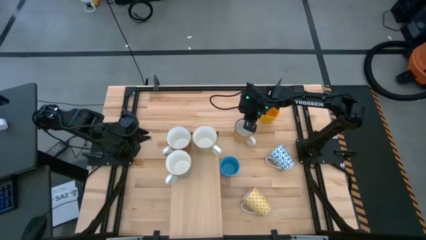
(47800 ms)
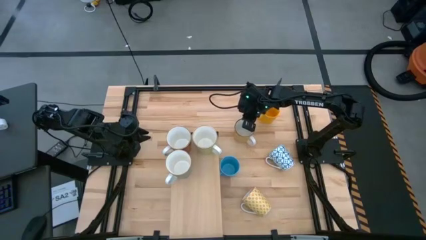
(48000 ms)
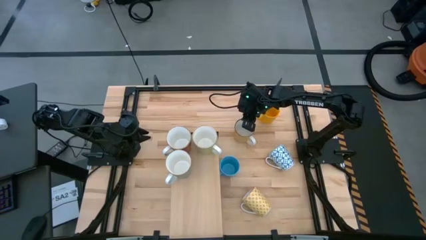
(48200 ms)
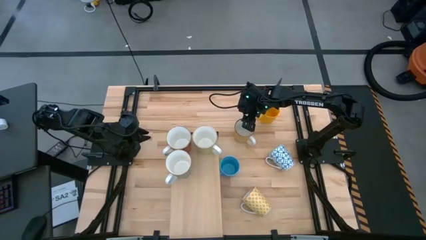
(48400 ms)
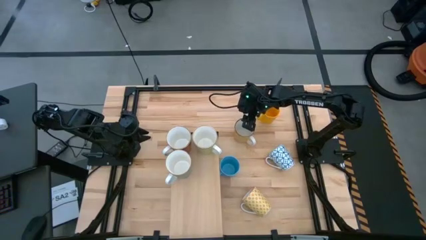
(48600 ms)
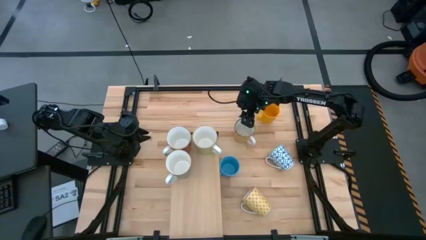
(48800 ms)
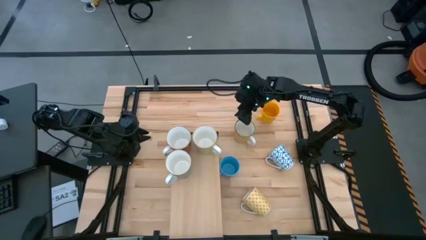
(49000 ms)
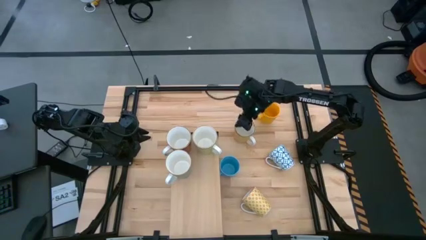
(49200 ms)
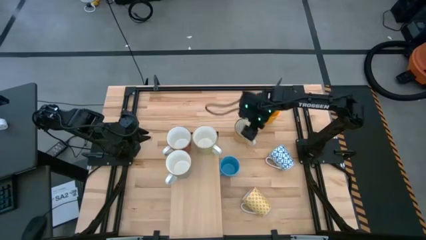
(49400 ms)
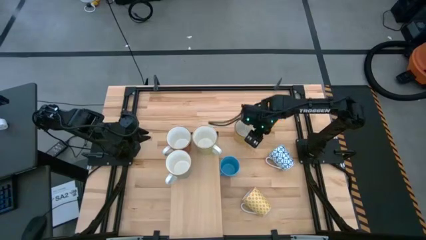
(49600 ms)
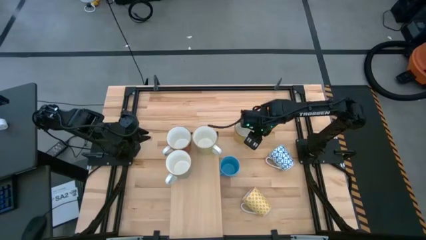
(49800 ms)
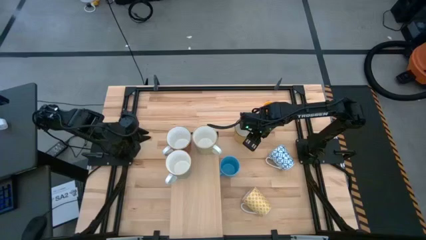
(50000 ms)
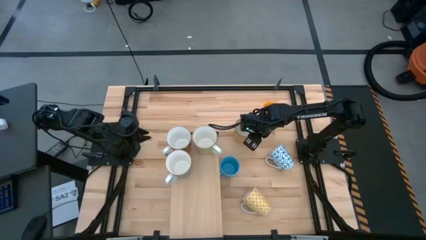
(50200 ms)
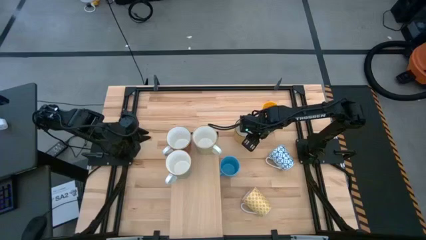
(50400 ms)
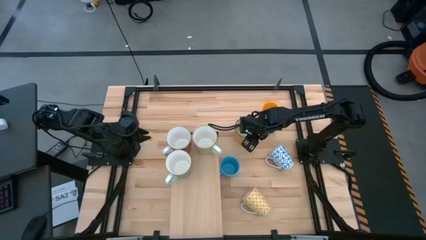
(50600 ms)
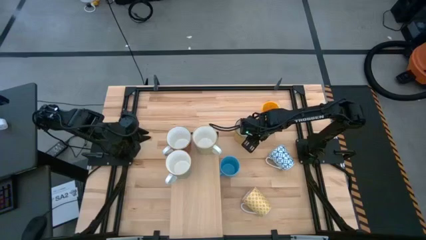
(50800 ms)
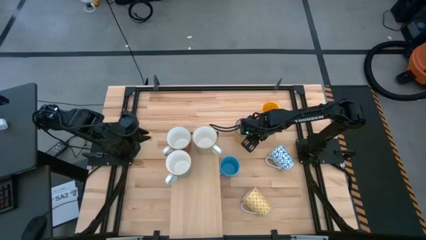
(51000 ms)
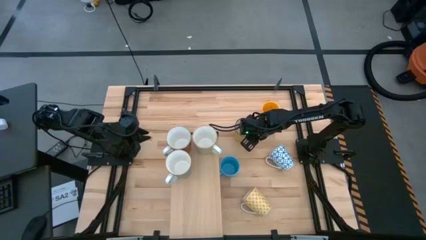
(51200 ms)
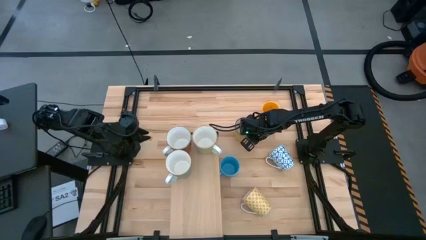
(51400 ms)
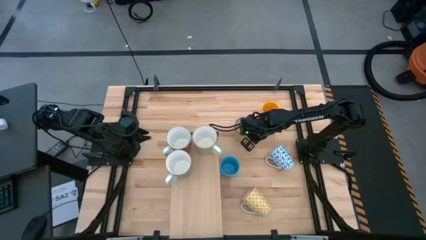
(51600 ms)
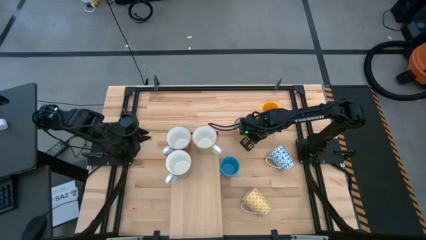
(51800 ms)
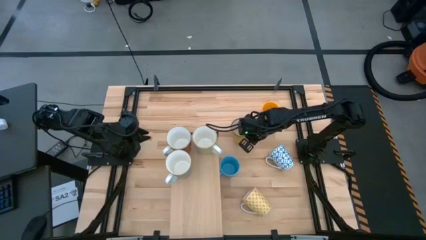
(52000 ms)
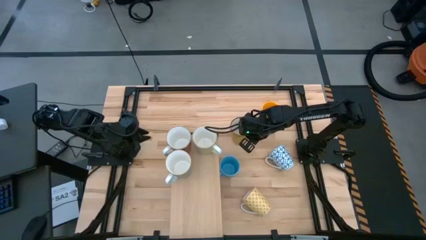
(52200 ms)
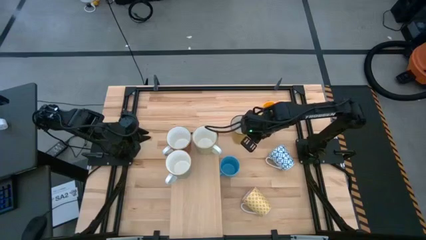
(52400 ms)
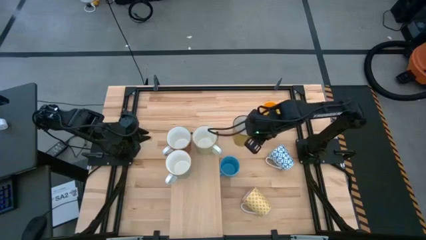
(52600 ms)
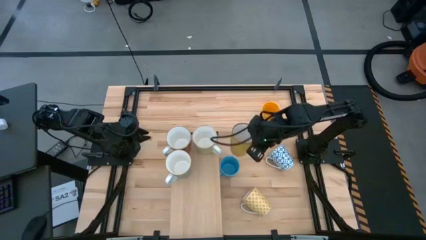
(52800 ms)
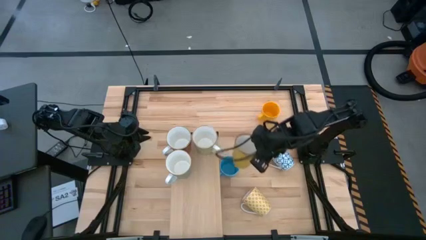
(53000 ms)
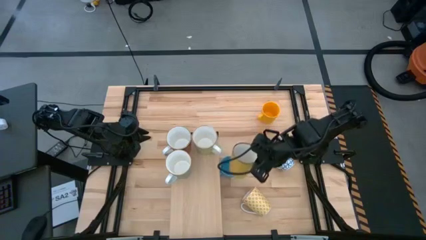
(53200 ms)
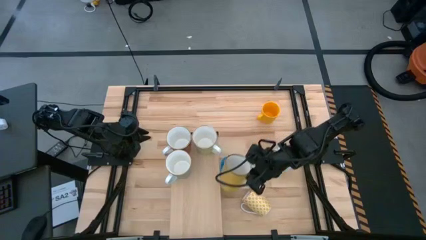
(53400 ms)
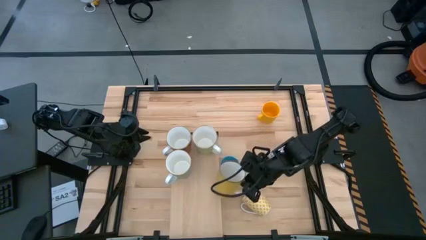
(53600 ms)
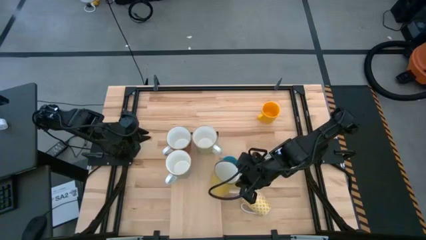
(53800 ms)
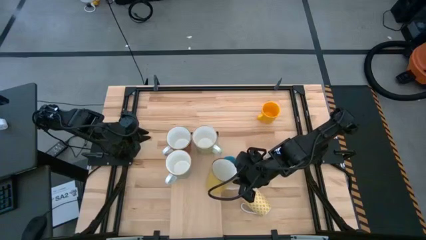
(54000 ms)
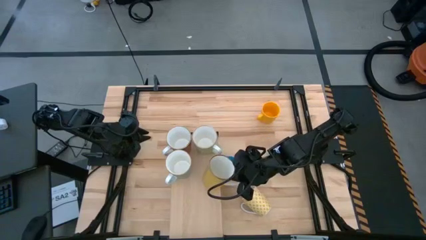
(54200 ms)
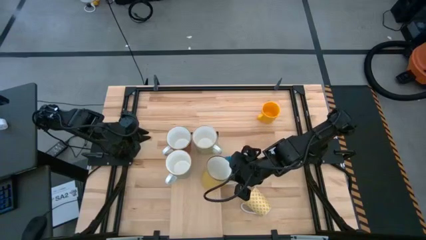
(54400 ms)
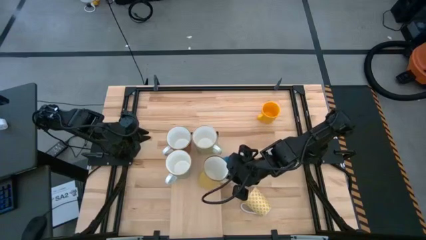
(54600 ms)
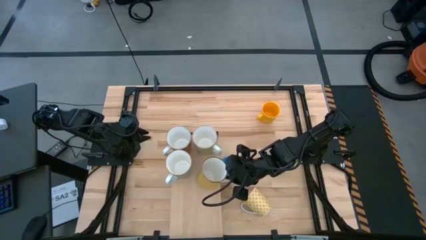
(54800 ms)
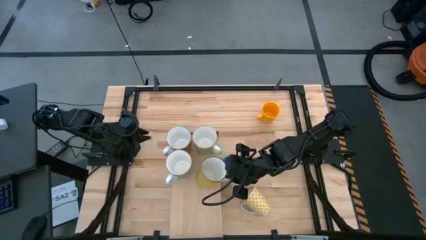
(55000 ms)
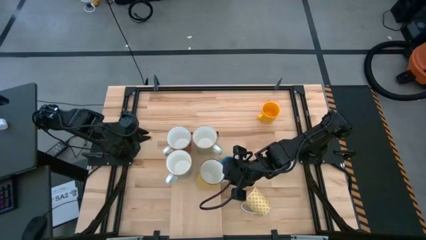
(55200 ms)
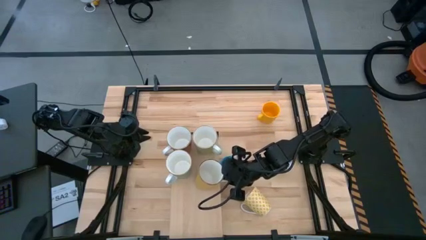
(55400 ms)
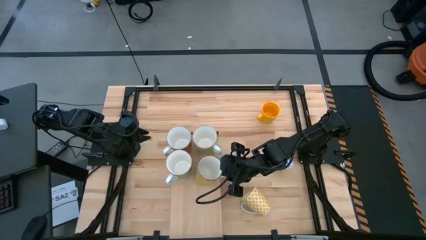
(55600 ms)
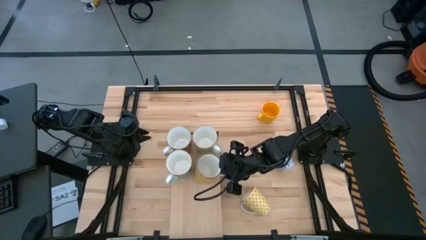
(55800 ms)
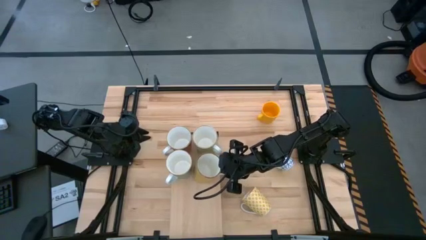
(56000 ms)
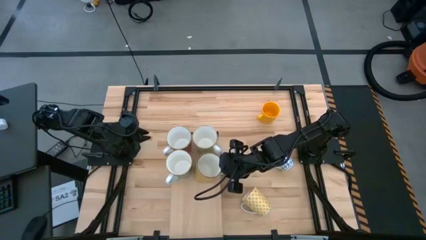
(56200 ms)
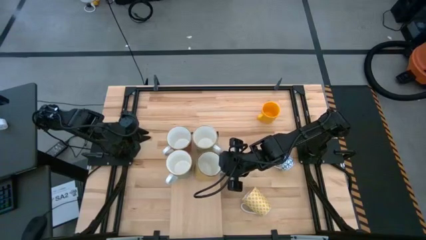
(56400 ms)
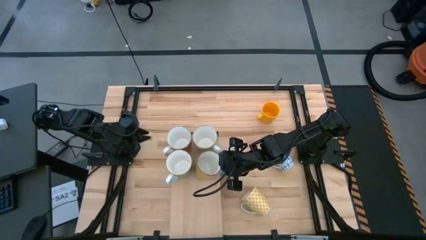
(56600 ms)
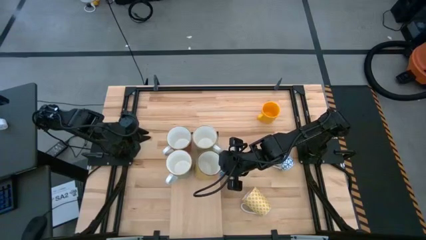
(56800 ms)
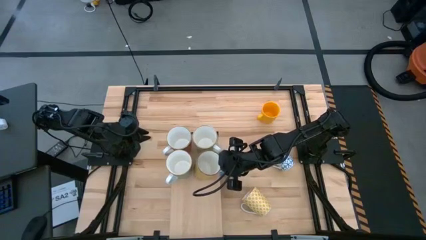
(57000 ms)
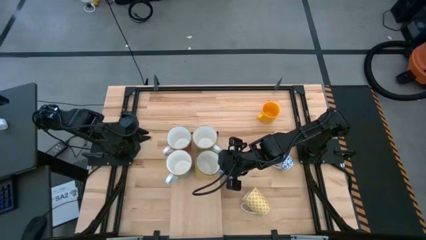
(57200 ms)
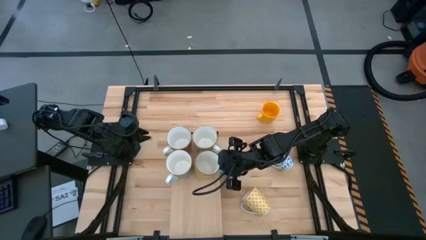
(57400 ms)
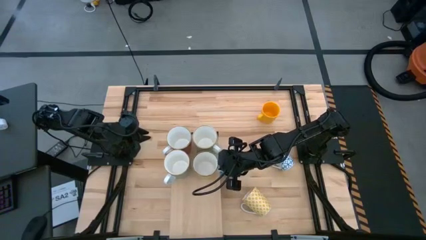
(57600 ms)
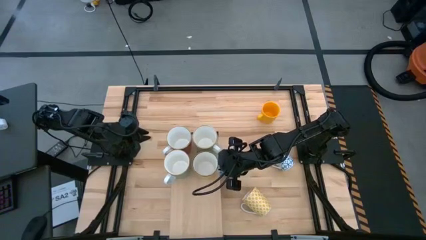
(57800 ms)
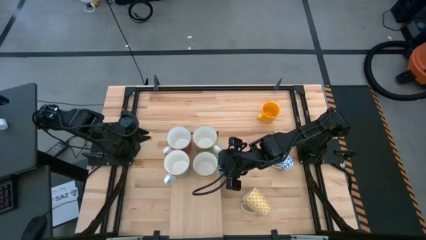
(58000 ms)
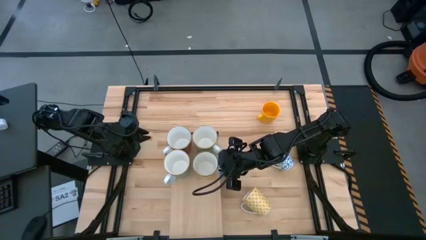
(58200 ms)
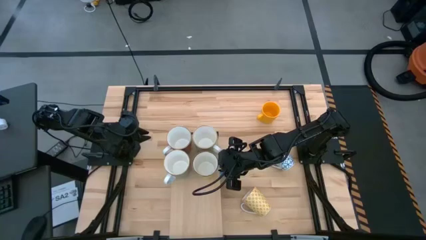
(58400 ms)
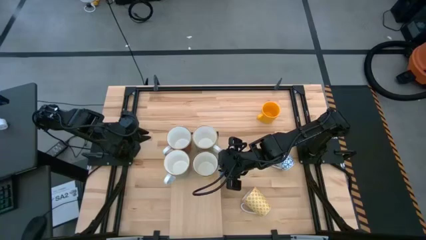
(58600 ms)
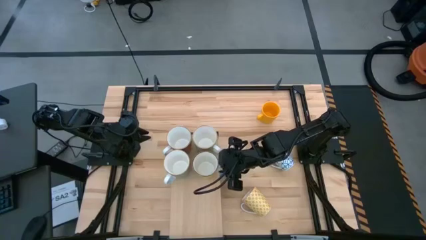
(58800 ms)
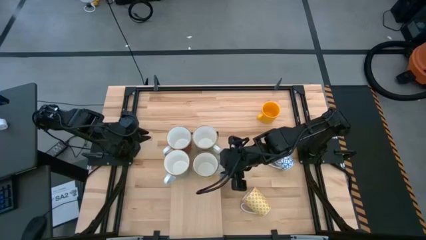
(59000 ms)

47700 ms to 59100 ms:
Task: Place coffee mugs
Put the left yellow mug on the shelf aligned with the green mug

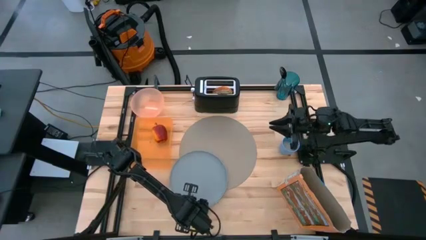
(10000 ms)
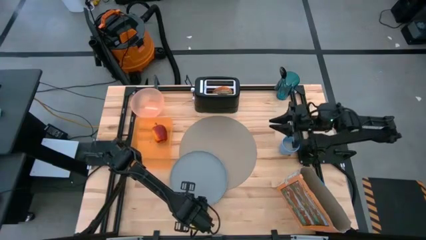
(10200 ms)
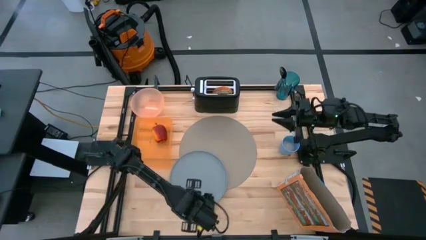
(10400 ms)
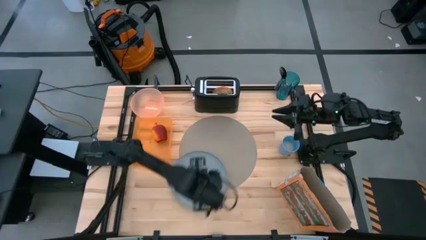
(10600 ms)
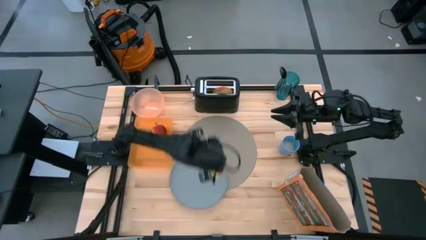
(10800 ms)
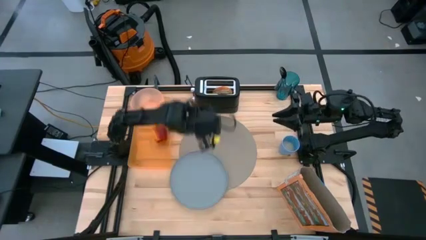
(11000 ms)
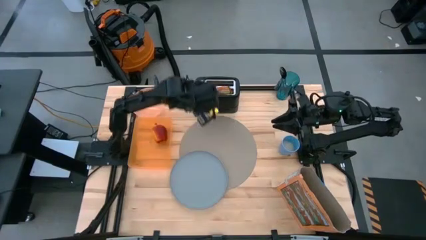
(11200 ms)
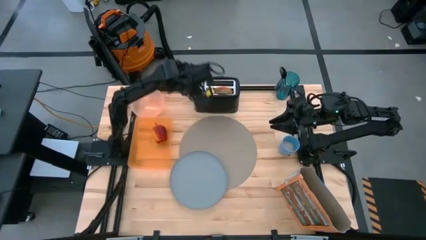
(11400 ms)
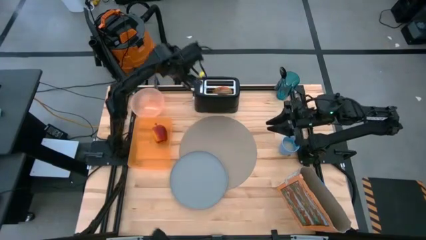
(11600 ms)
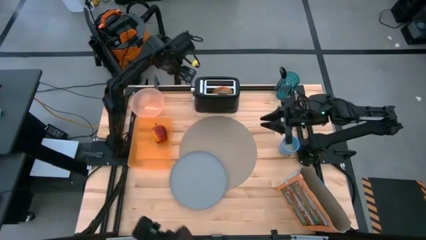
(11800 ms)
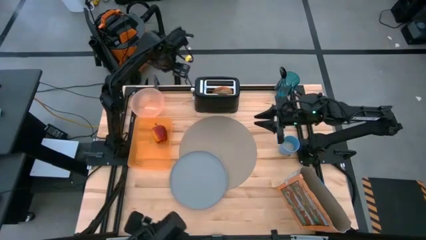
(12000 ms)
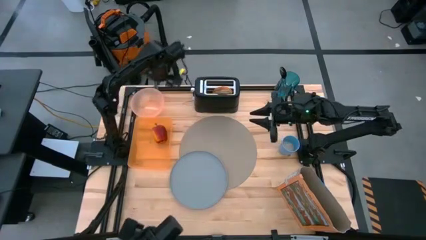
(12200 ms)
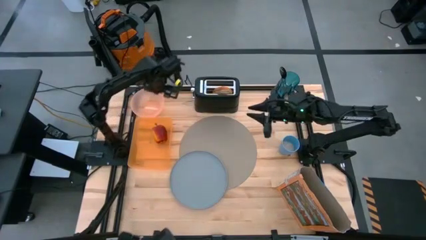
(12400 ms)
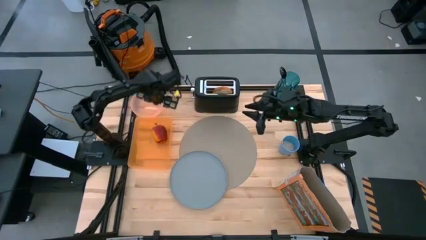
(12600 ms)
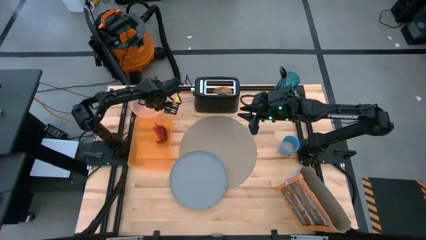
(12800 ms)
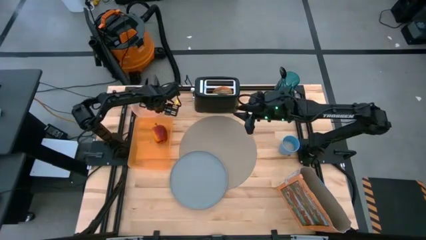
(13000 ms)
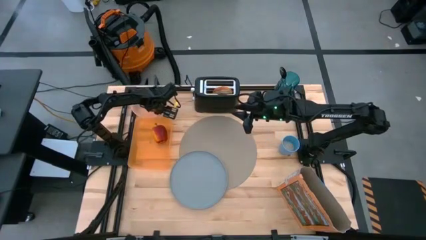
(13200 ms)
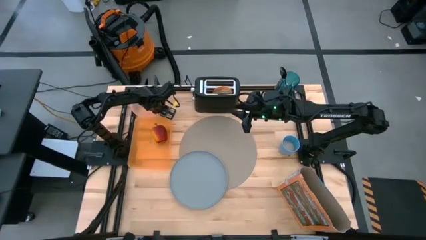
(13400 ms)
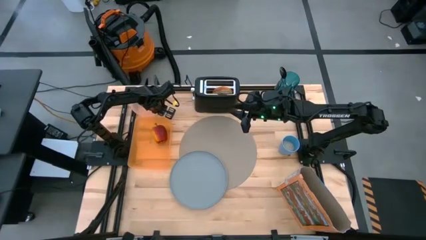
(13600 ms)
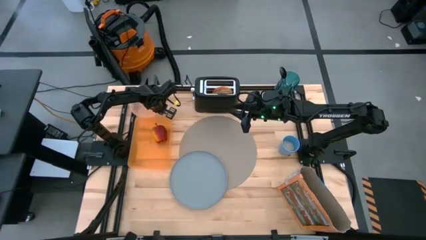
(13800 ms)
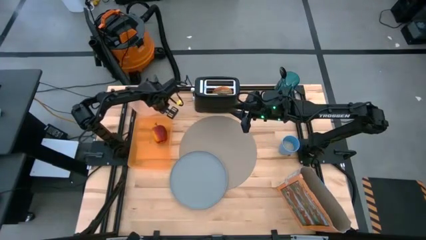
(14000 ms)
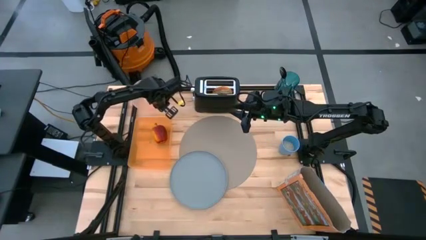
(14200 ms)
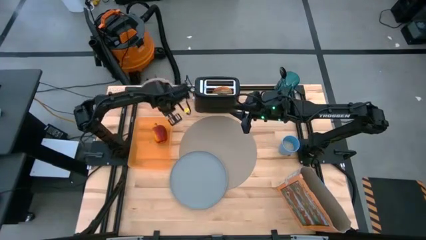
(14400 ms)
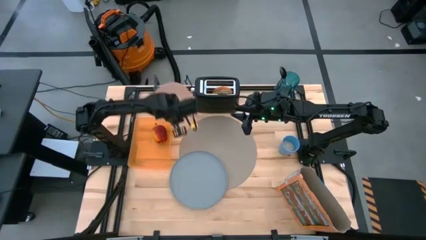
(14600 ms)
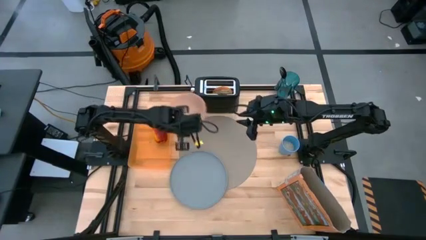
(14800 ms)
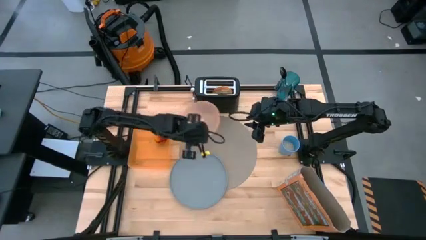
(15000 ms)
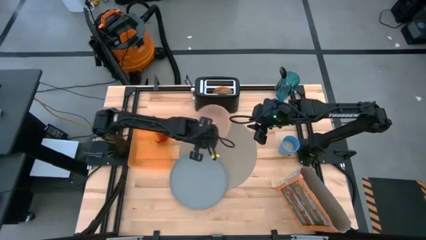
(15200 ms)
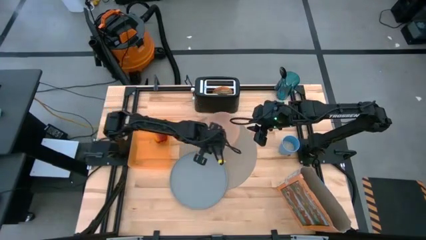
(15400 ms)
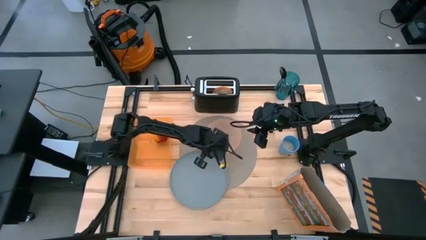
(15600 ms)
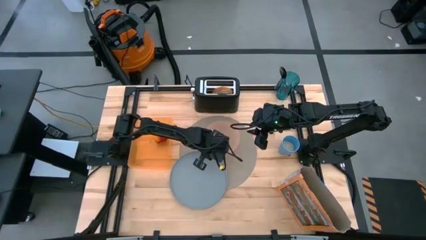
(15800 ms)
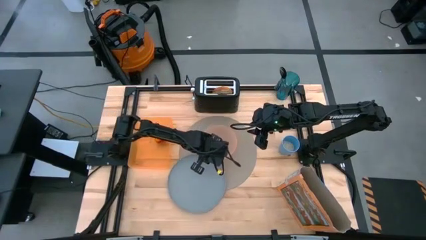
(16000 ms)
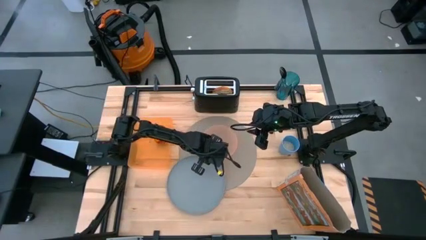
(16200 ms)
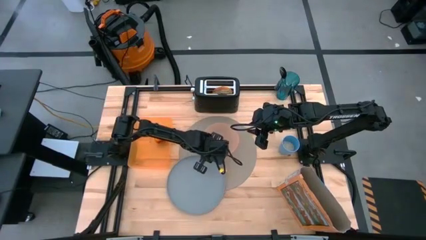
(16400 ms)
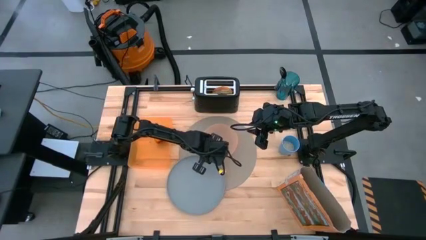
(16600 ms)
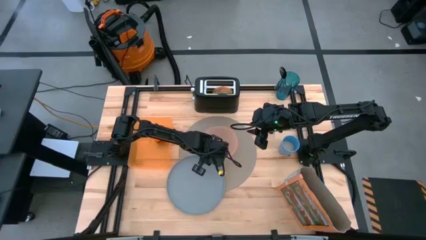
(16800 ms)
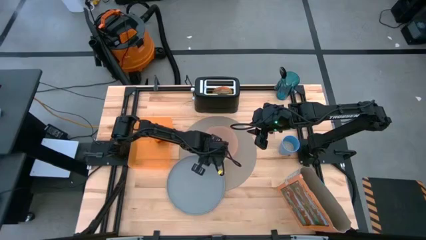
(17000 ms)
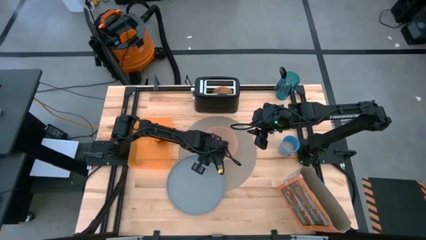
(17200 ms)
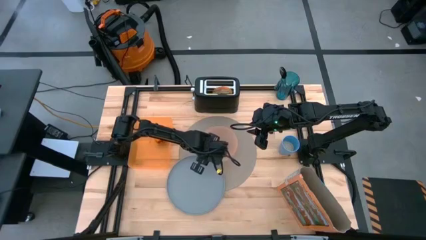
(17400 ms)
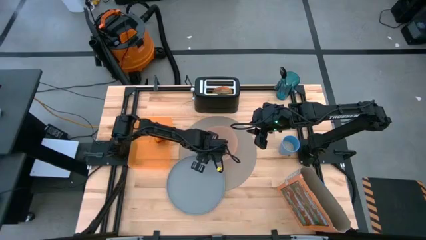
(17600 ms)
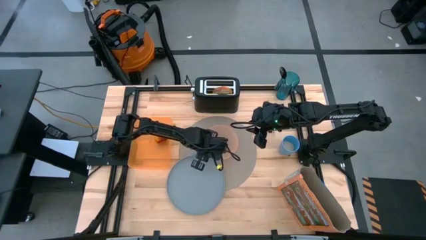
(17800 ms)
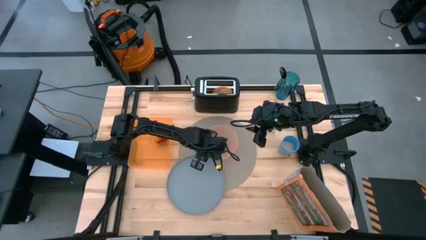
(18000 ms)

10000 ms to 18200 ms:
Task: Arrange a breakfast setting
Put the orange bowl in the center of the gray table mat
